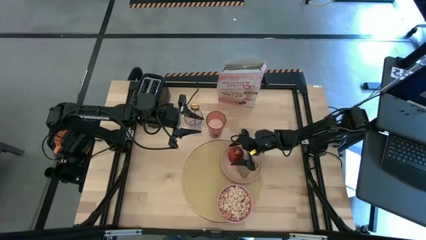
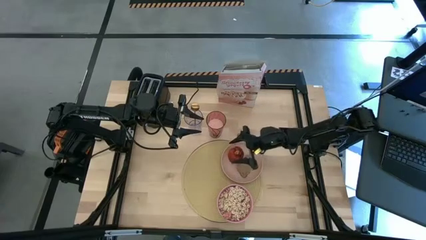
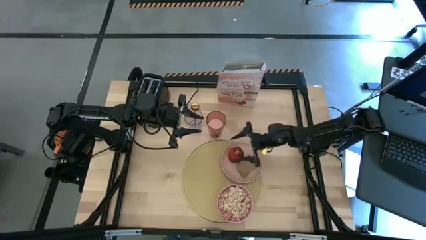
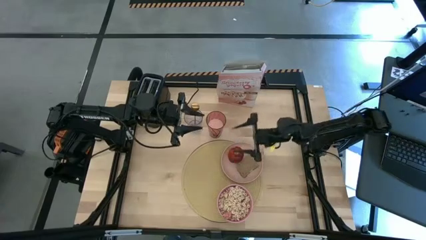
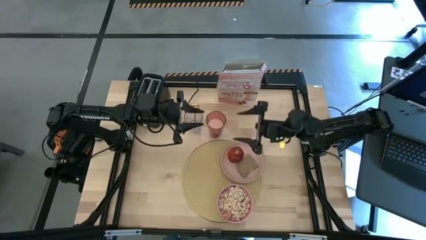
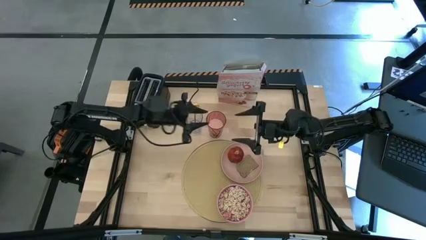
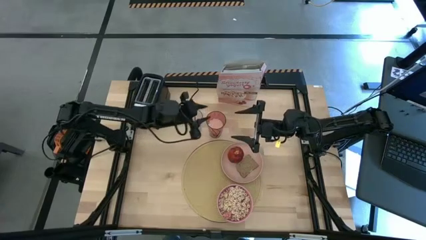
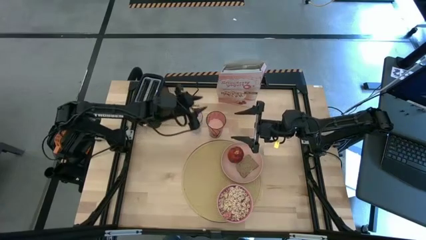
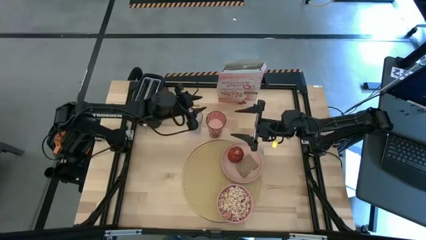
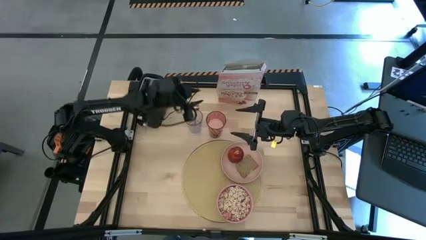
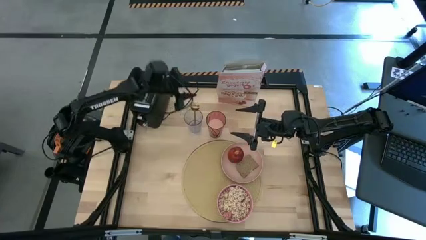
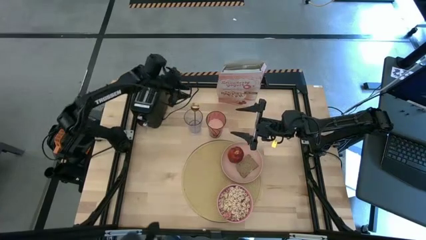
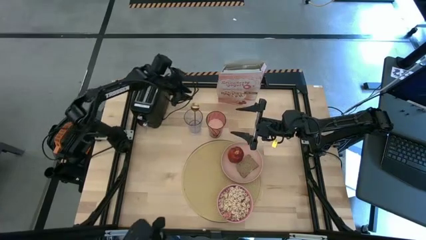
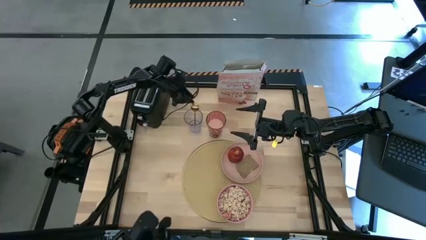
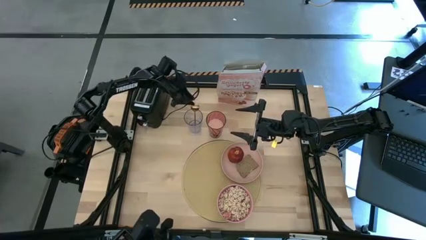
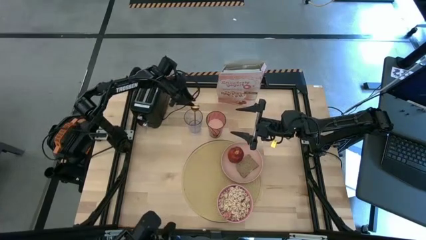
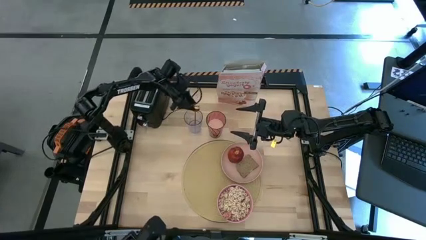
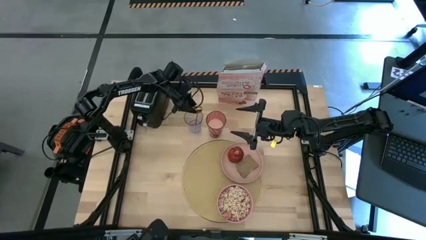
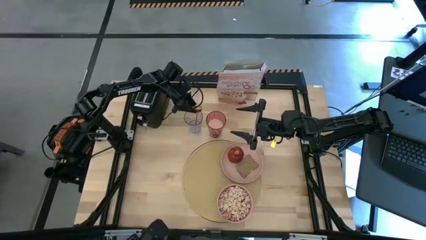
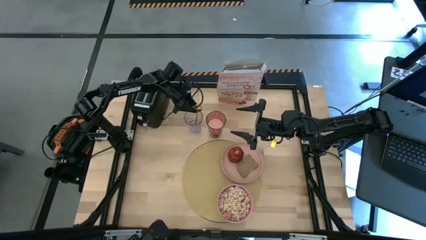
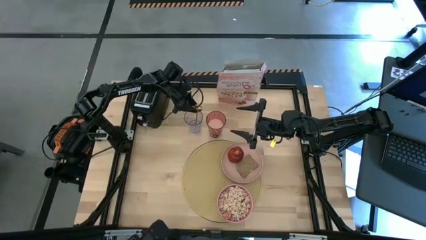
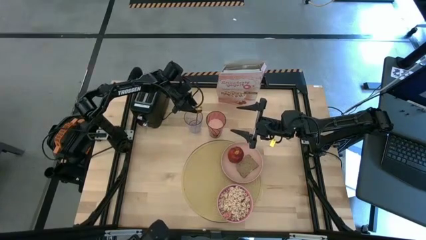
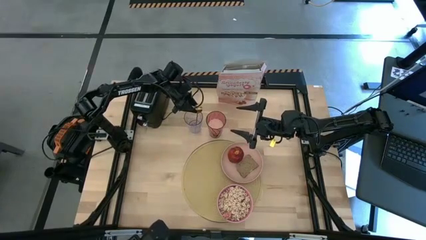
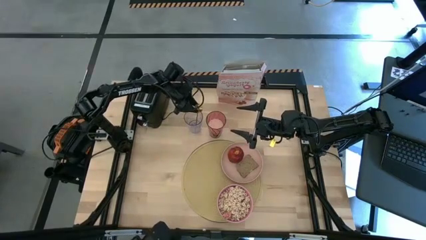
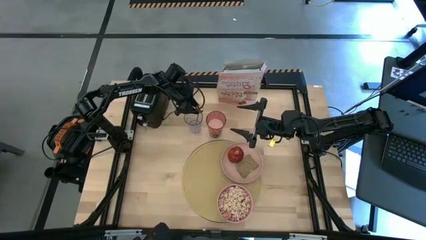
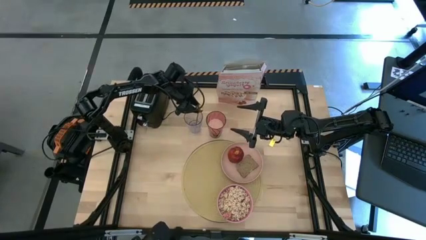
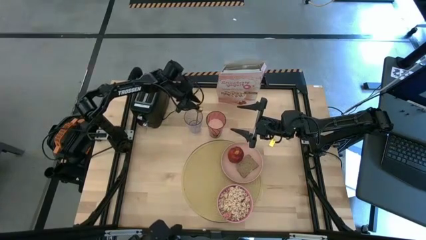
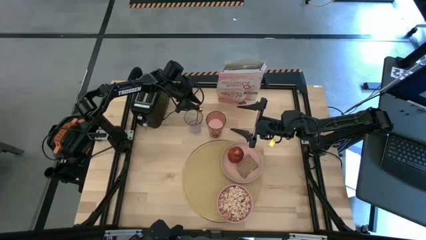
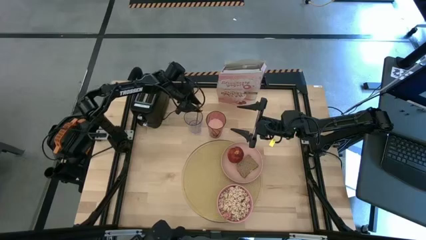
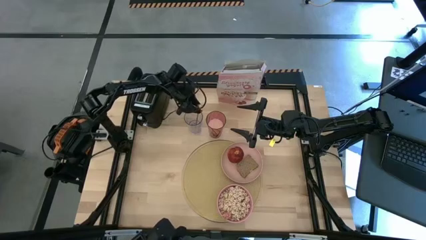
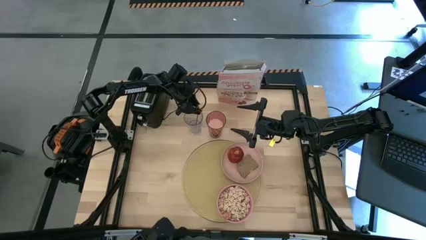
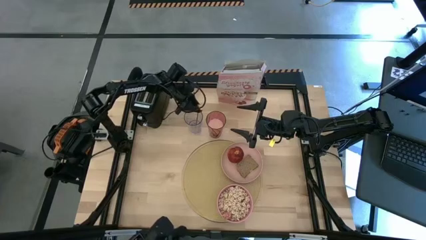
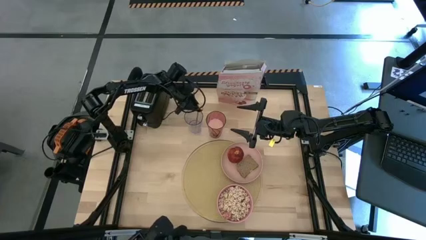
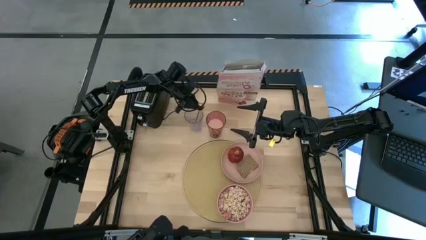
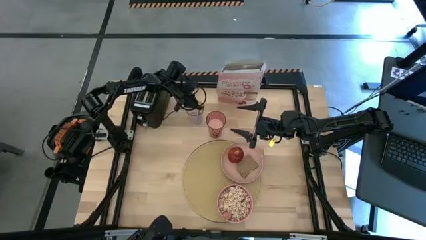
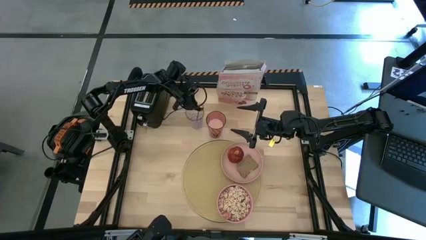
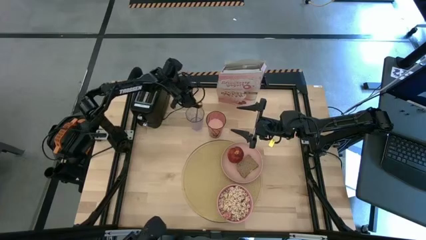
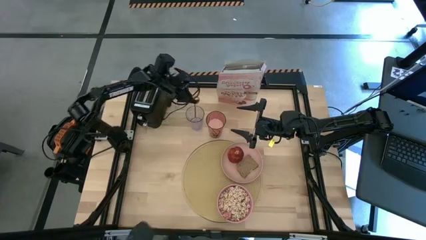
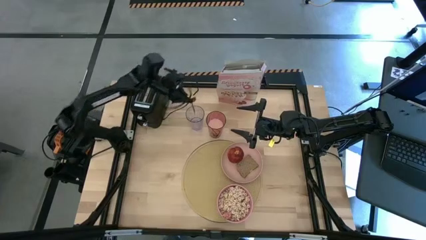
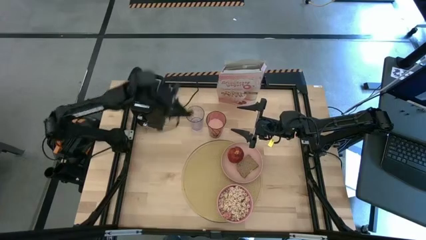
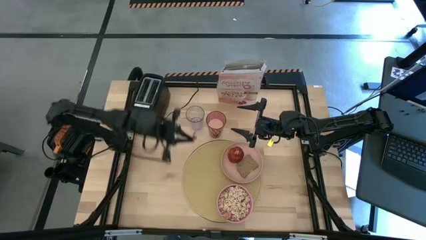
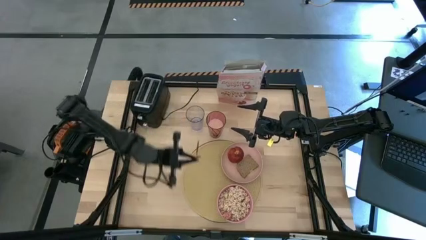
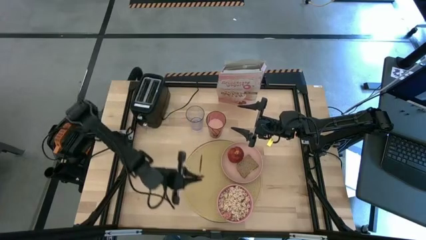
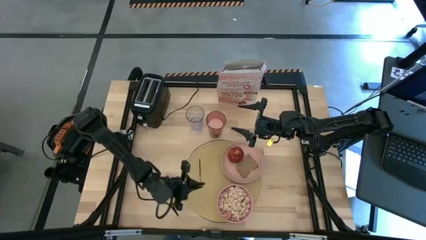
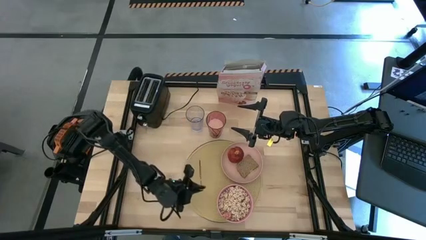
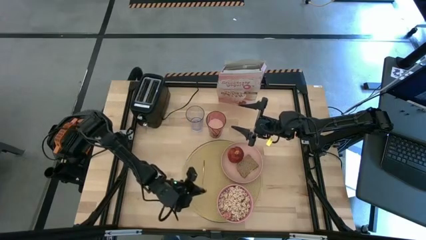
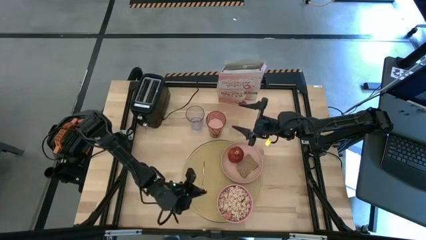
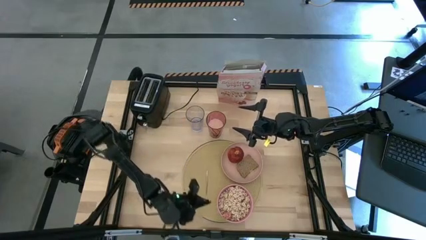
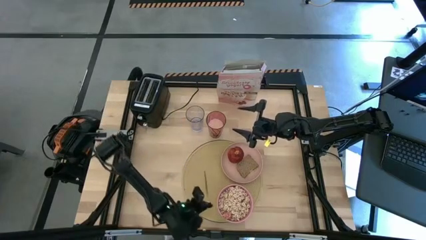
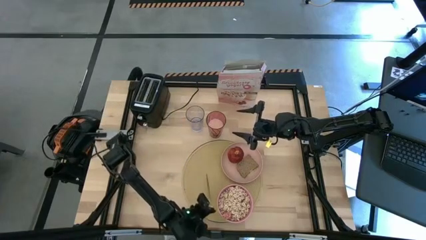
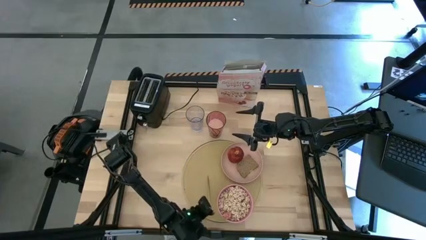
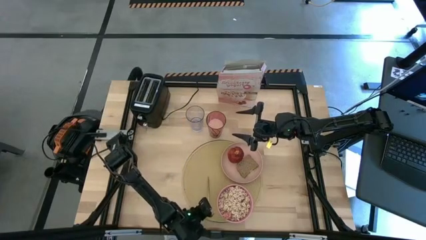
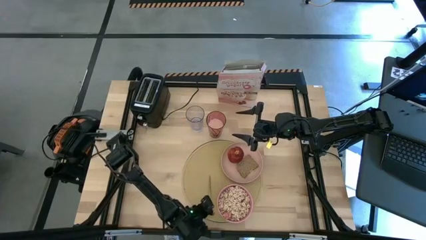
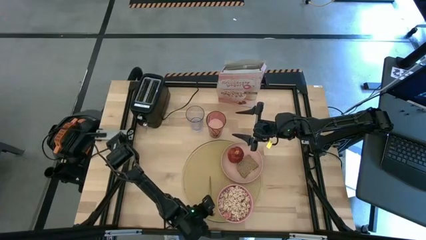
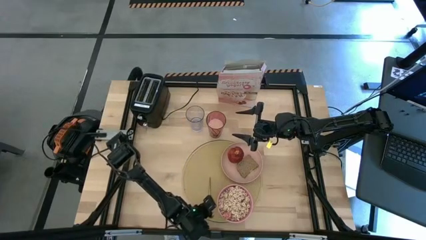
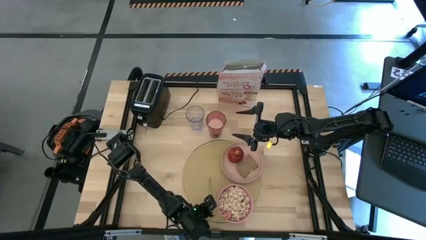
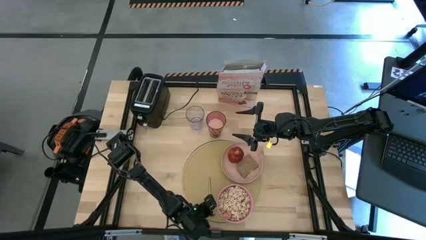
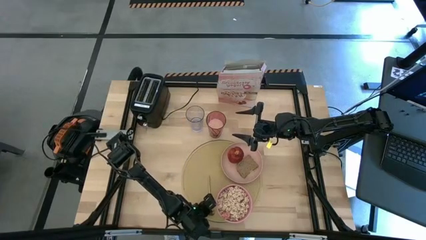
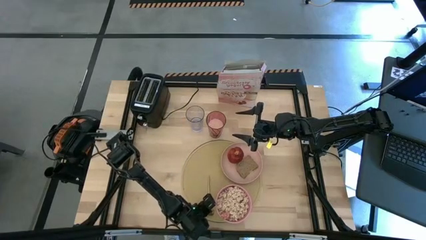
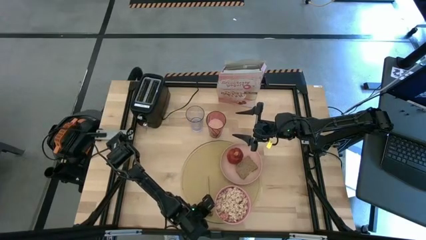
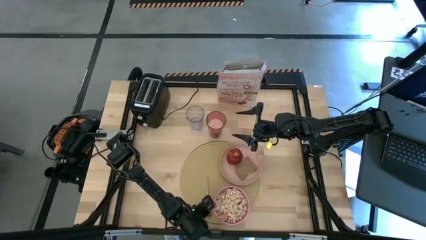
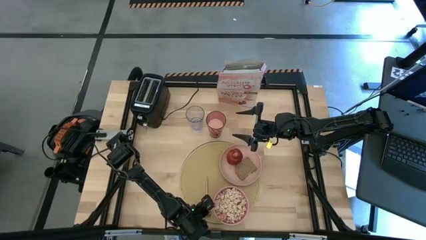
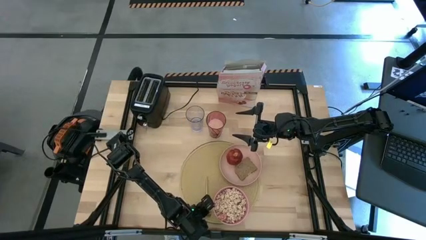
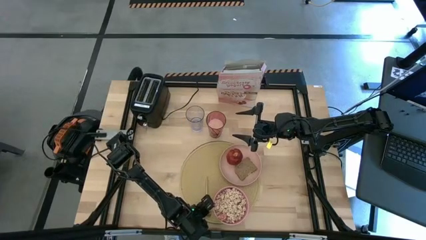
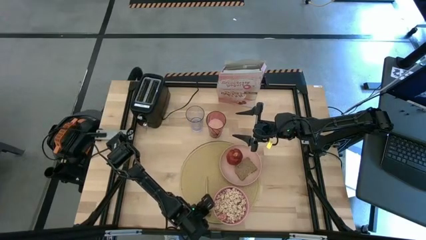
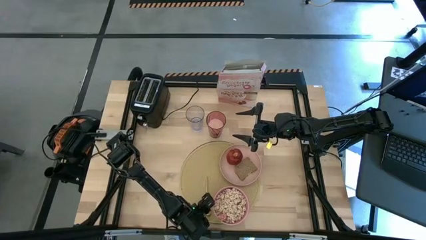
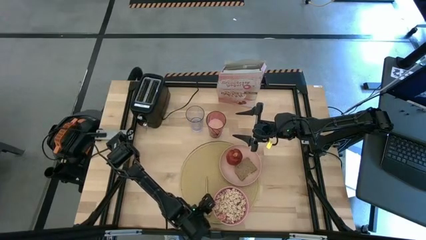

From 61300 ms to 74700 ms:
Task: Arrange a breakfast setting
Put the gold spoon to the right of the pink bowl on the brown table mat
